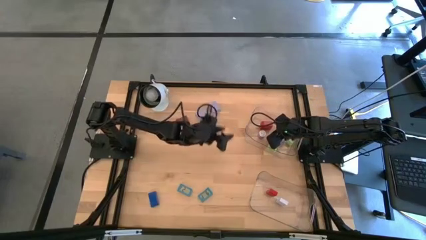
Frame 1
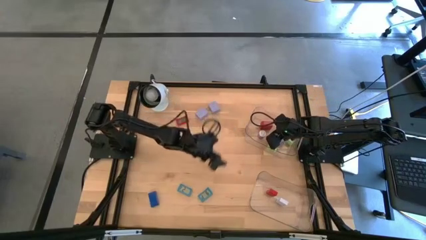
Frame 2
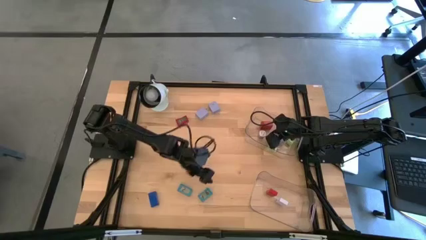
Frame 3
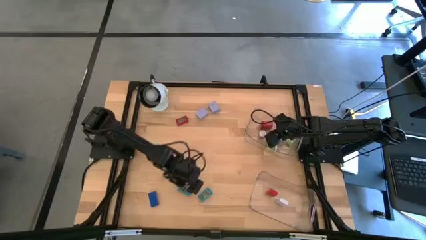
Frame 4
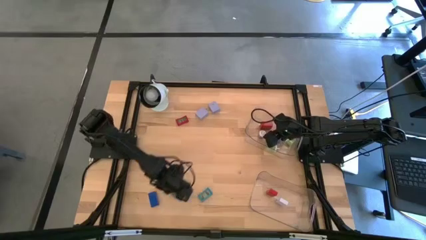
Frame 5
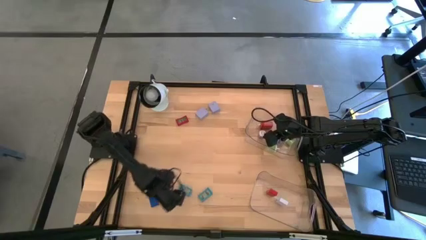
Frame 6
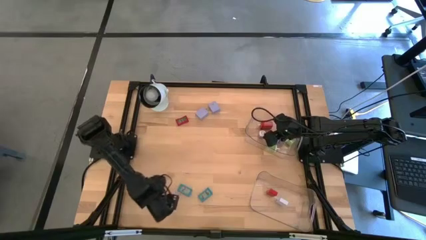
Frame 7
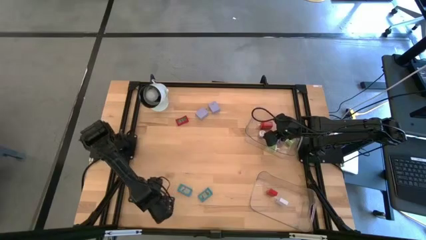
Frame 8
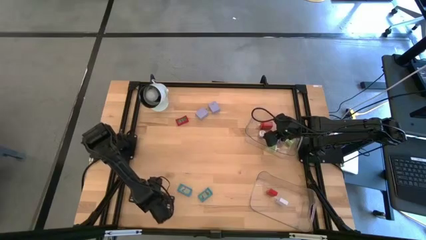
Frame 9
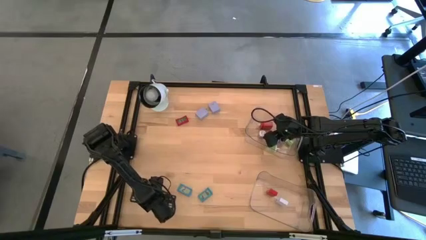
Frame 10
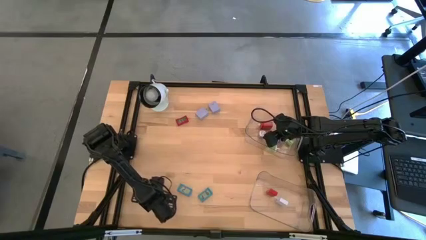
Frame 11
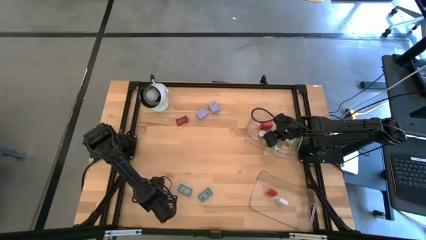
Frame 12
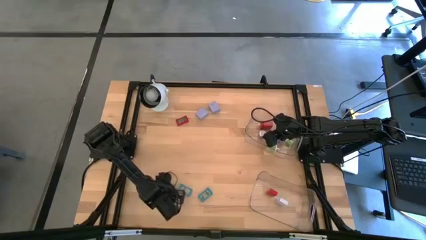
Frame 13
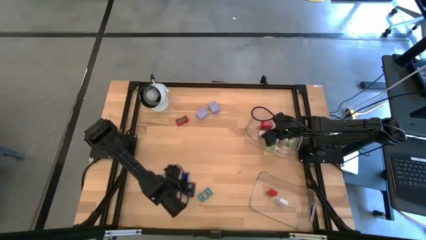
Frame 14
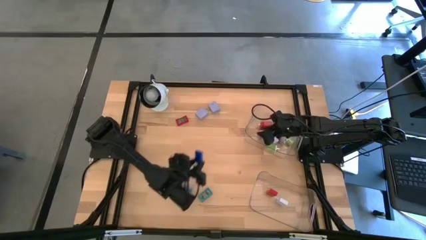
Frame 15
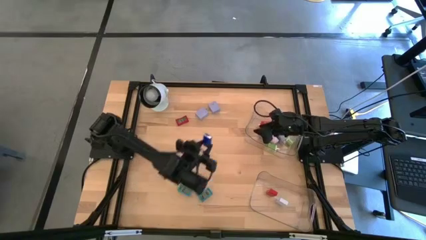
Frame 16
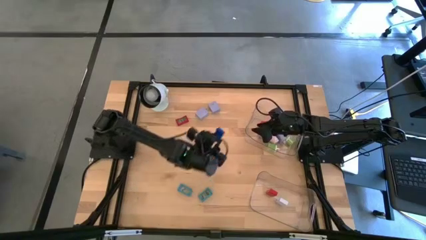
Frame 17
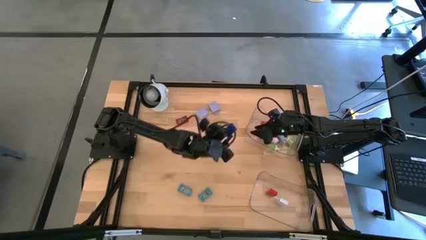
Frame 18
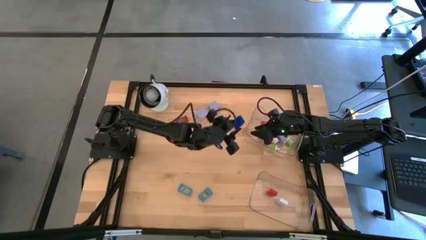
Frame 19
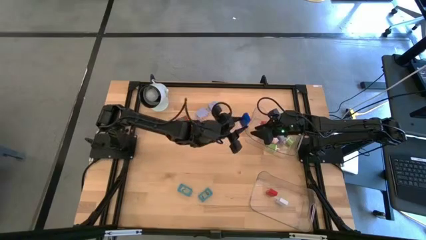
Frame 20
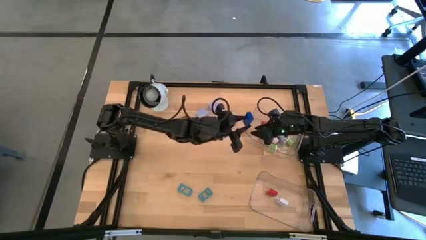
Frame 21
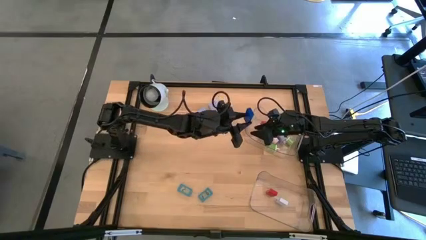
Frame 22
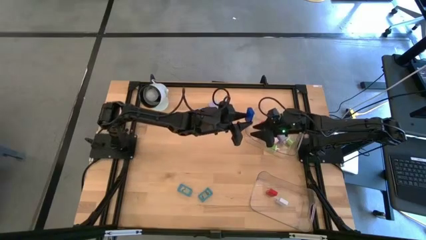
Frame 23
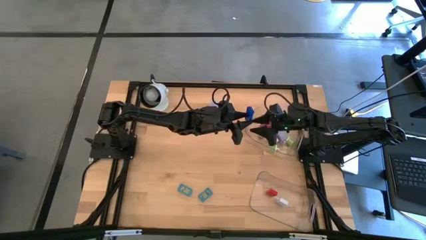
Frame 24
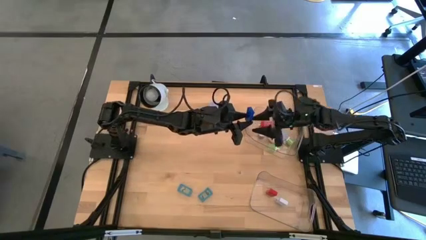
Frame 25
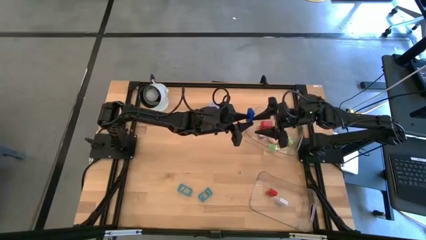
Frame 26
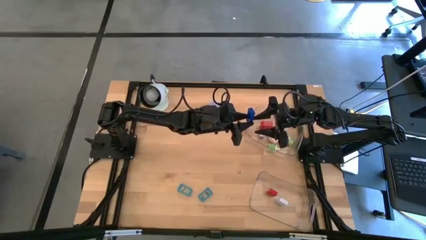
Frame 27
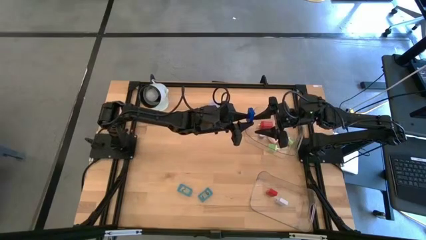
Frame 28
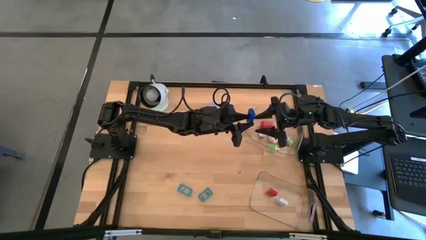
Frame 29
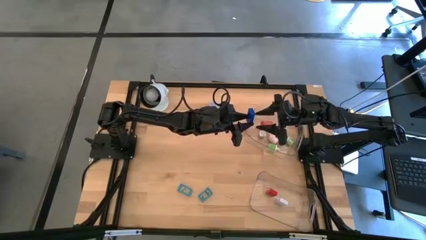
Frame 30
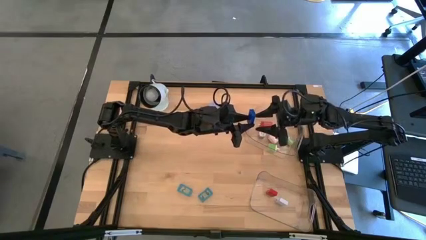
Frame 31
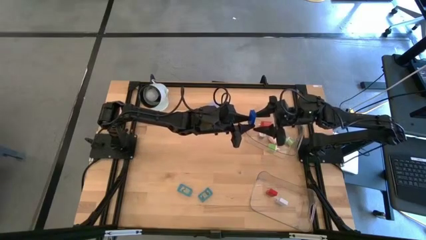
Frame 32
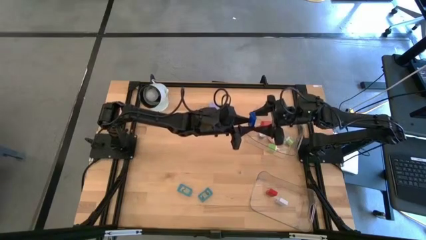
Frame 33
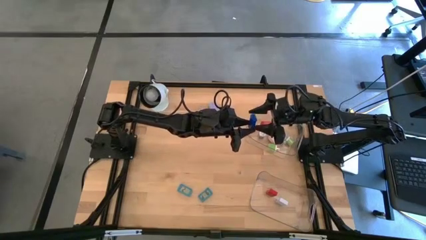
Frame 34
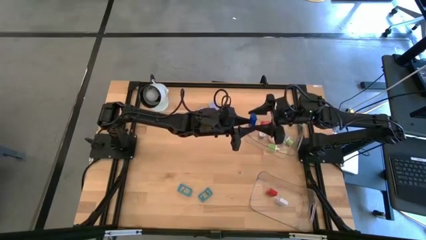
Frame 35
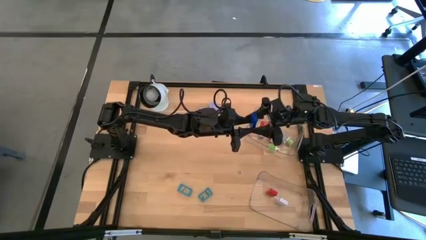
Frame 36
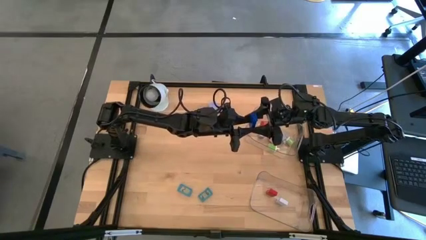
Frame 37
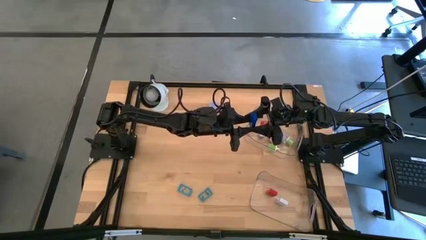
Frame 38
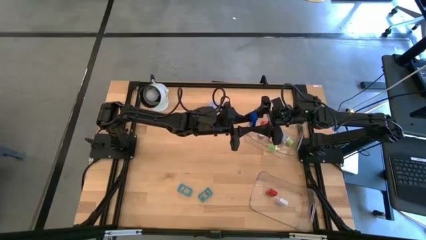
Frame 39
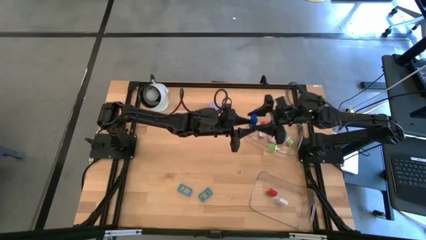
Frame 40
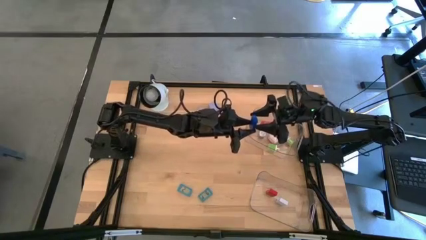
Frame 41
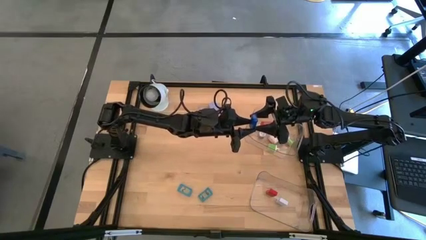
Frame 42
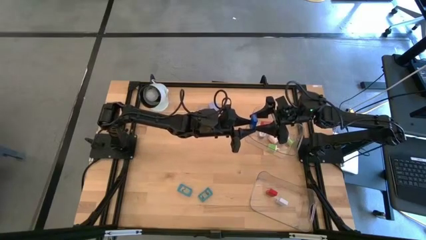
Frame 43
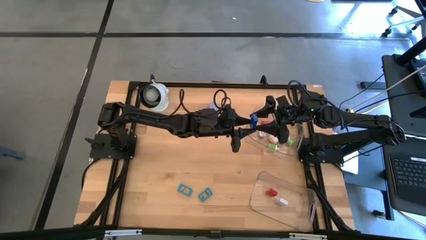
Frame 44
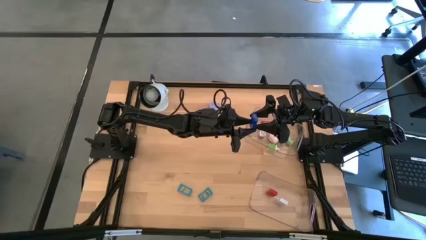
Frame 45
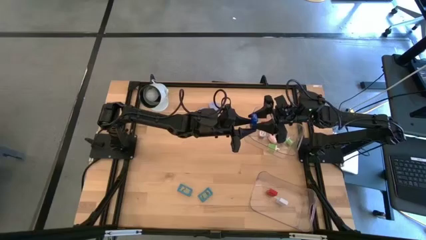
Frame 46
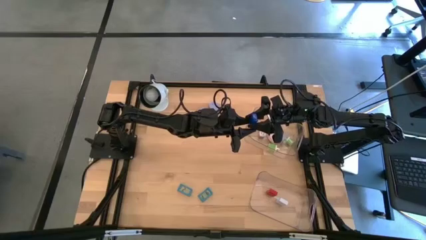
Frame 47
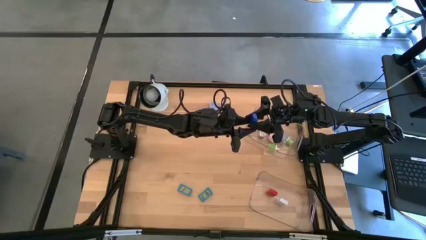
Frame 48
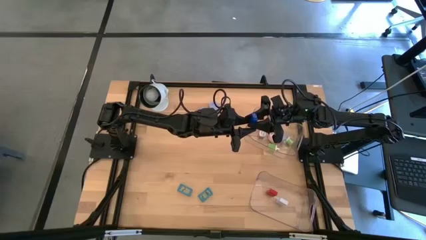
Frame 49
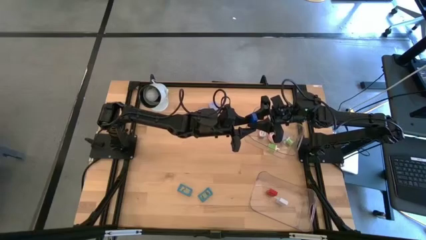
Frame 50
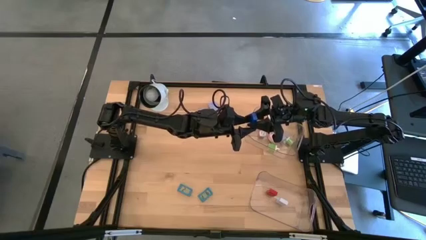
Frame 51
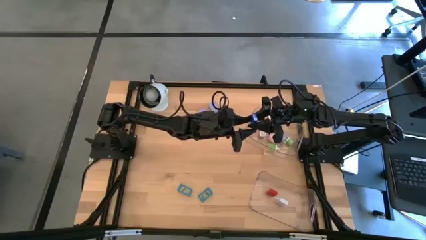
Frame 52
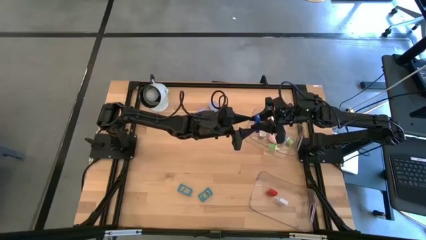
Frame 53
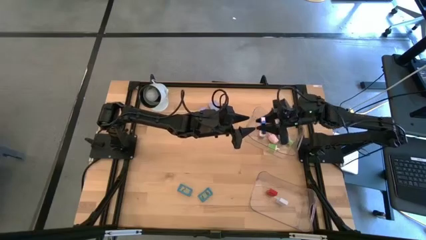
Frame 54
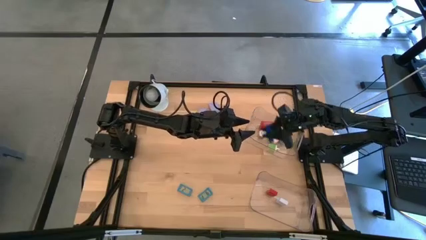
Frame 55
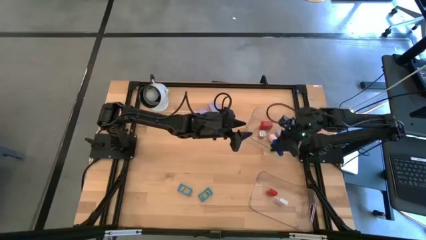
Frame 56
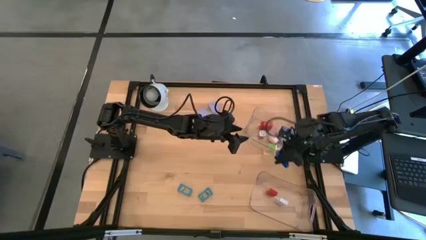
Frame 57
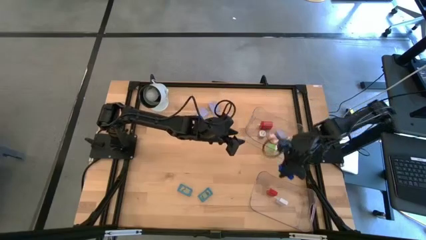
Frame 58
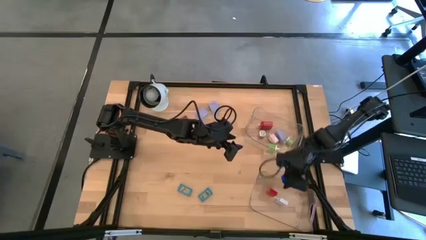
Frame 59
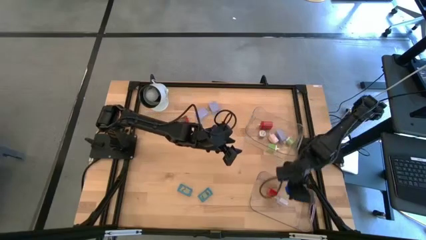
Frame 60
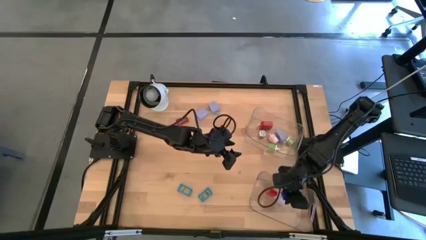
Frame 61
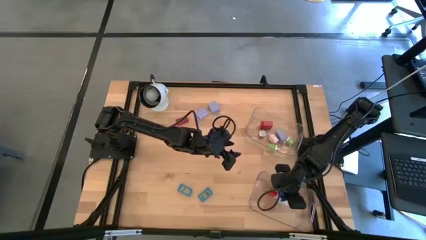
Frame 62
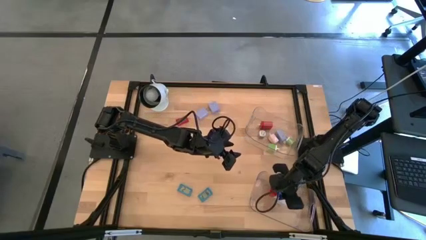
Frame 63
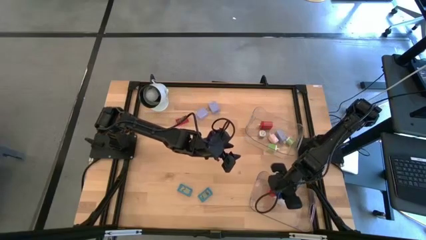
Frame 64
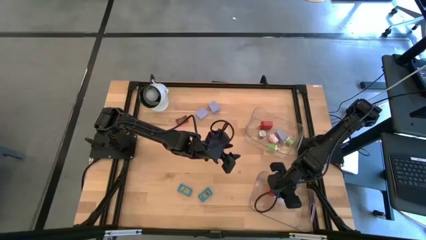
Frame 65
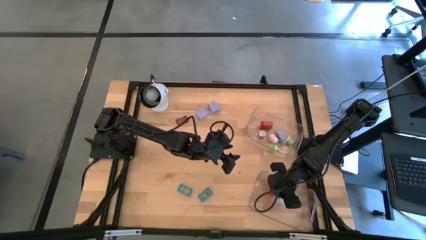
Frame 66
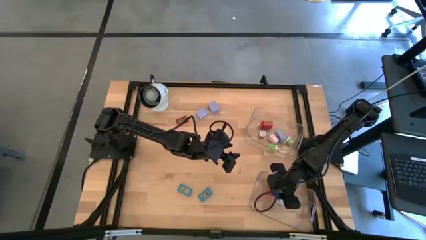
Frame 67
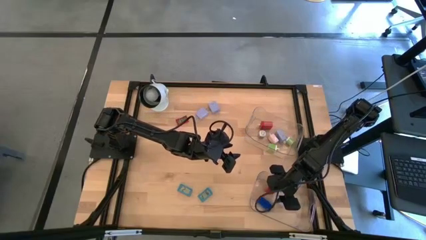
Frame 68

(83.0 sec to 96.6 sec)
Task: Pick & Place Office items
Put the dark blue digital clock into the bottom transparent bin

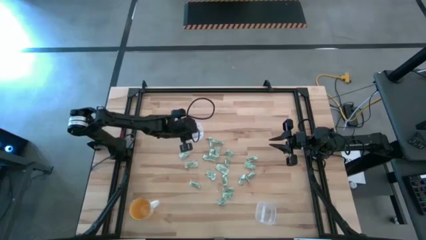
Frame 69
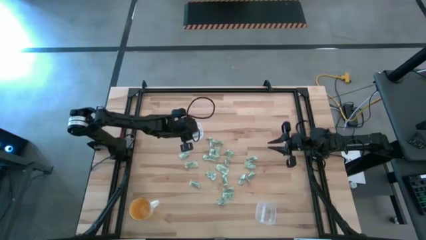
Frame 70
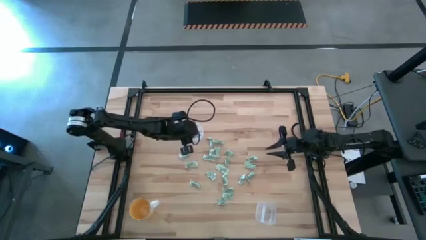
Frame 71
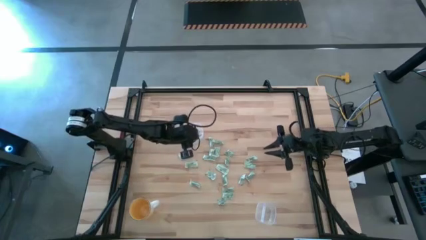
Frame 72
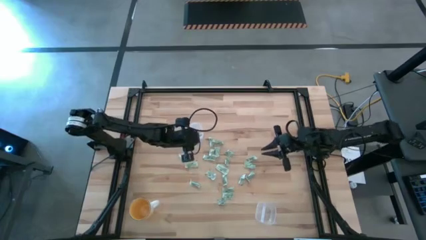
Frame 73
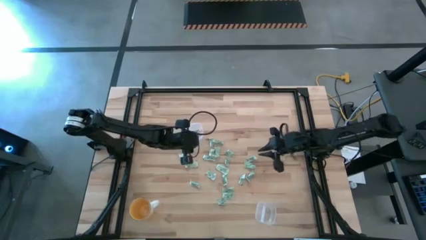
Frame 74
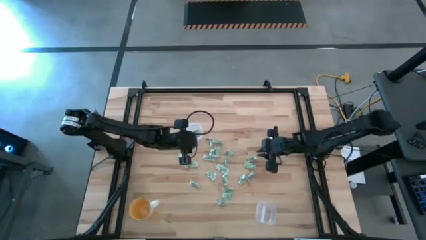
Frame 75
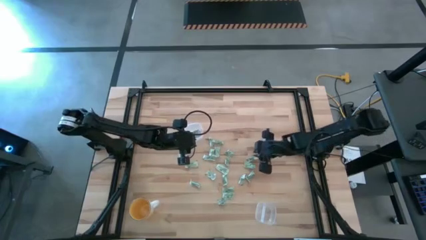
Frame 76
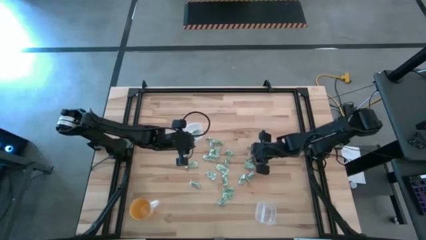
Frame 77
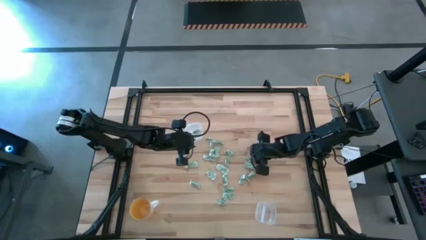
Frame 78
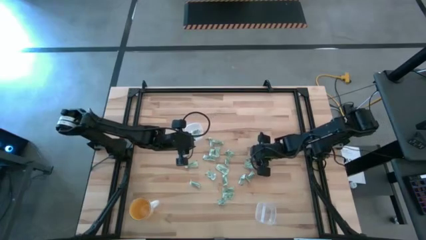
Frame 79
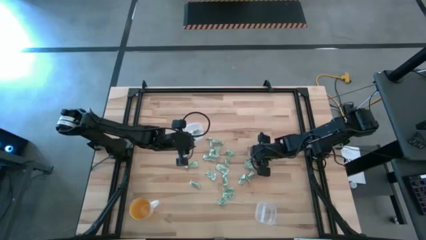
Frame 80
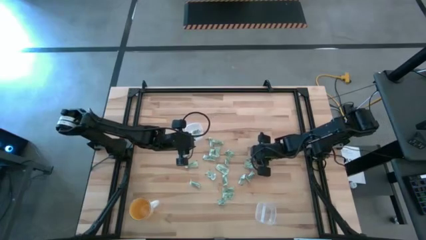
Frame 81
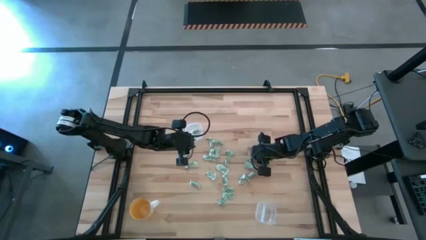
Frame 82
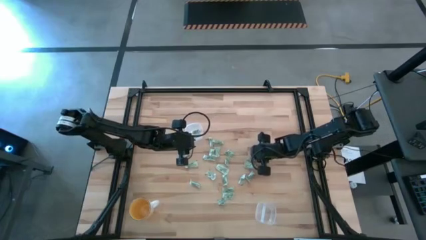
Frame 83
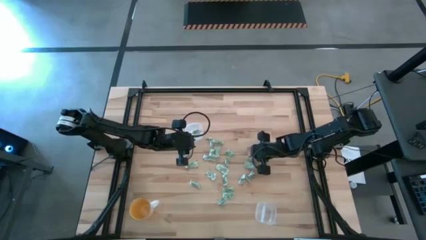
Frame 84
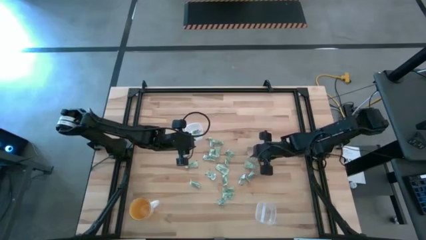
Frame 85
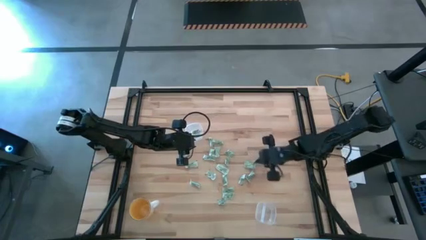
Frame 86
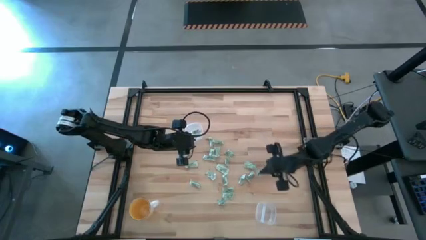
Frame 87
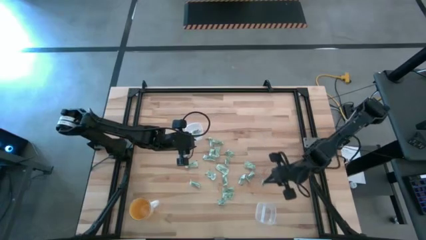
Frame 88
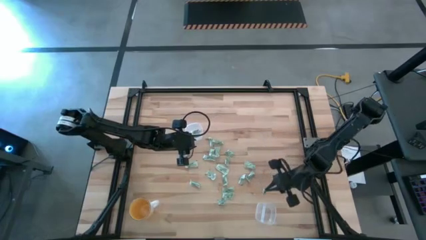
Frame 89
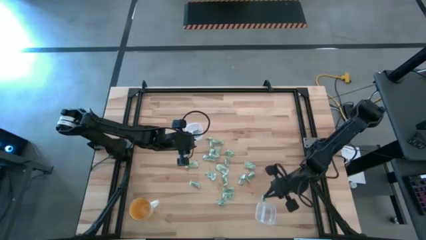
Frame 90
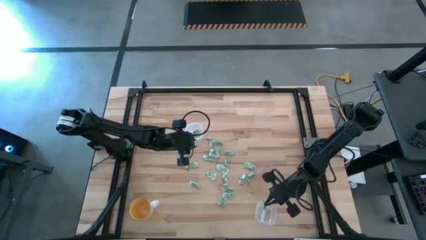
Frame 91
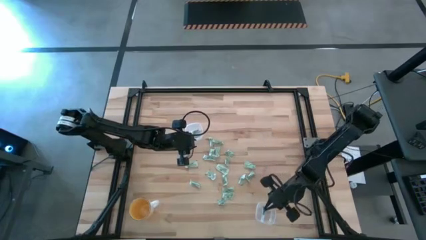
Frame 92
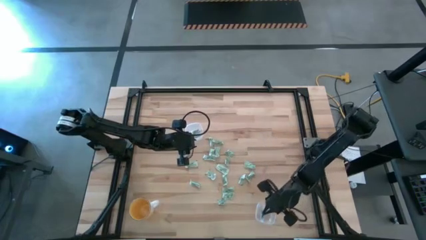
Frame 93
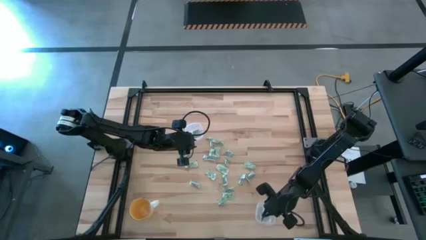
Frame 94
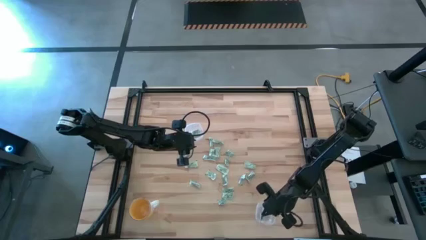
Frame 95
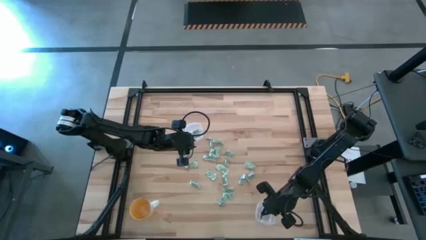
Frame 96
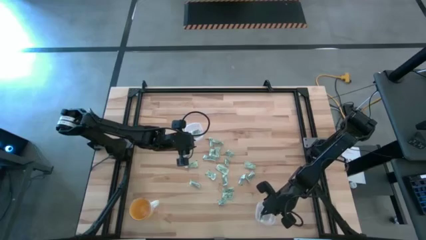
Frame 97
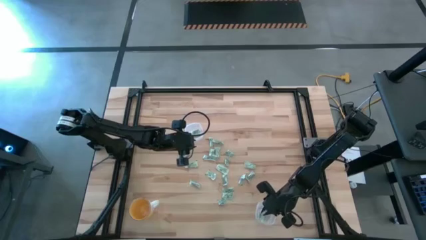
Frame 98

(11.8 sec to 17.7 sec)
Task: Pick and place Stevia / Truvia into bins
Put the stevia packet into the bottom transparent container
